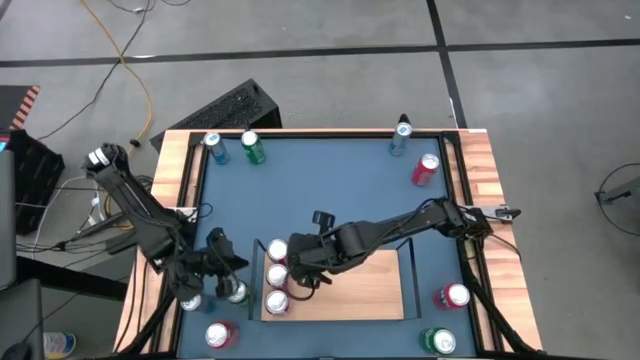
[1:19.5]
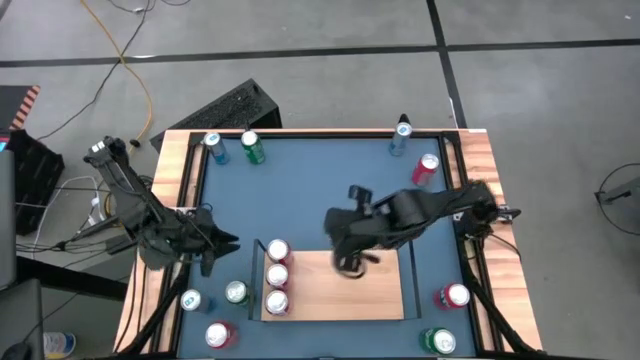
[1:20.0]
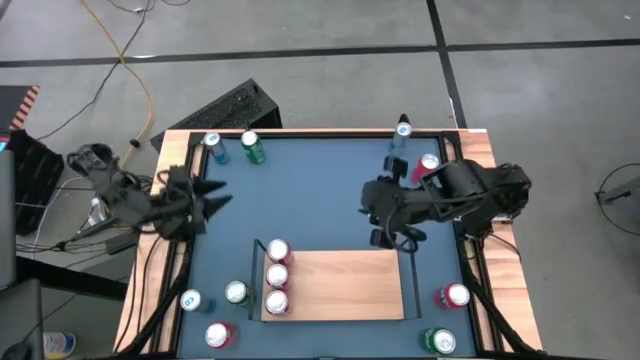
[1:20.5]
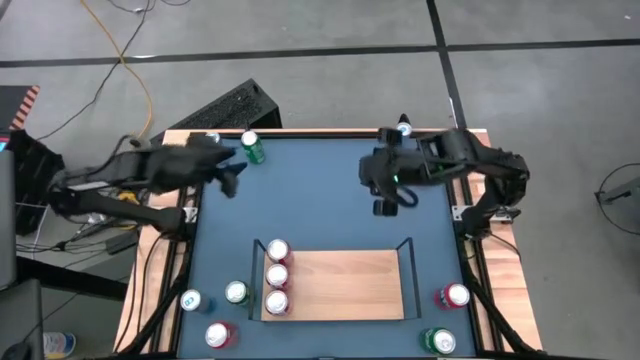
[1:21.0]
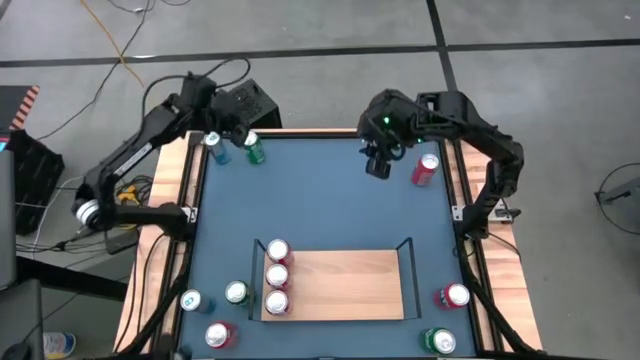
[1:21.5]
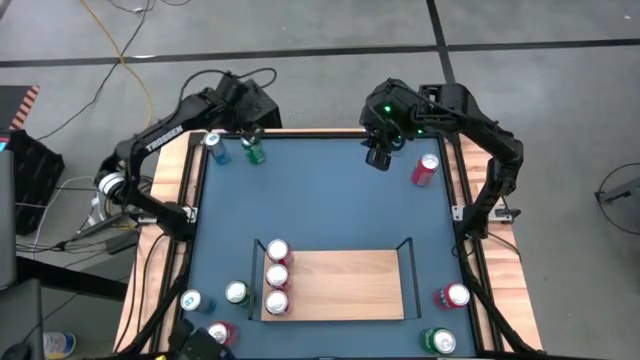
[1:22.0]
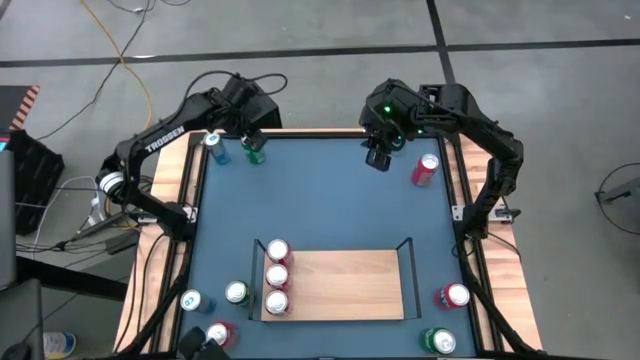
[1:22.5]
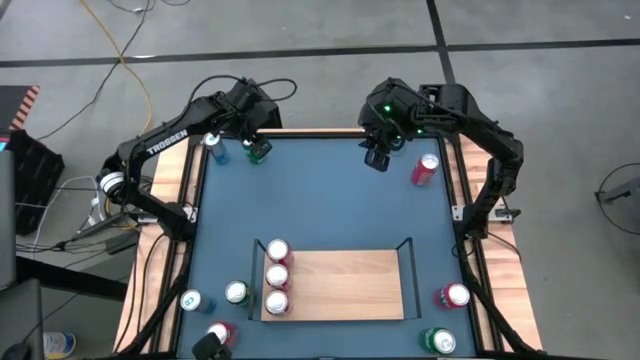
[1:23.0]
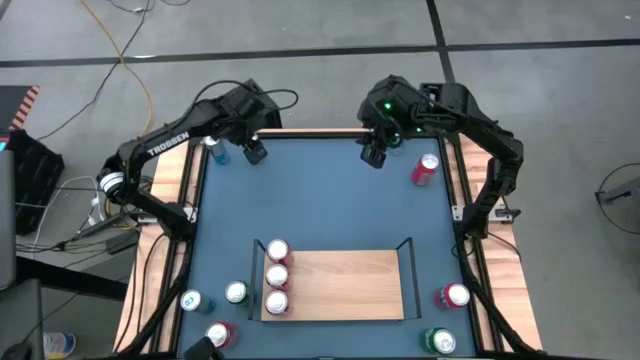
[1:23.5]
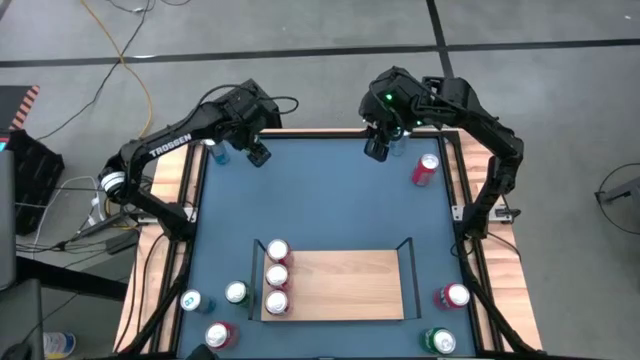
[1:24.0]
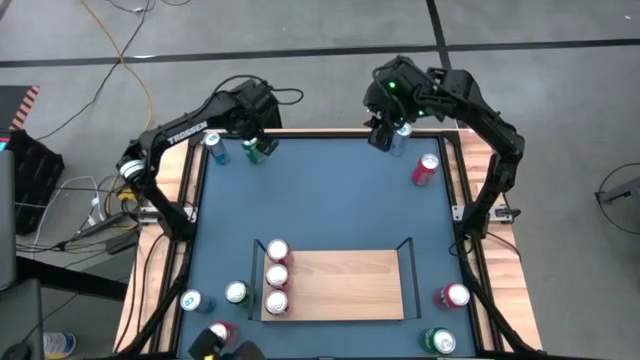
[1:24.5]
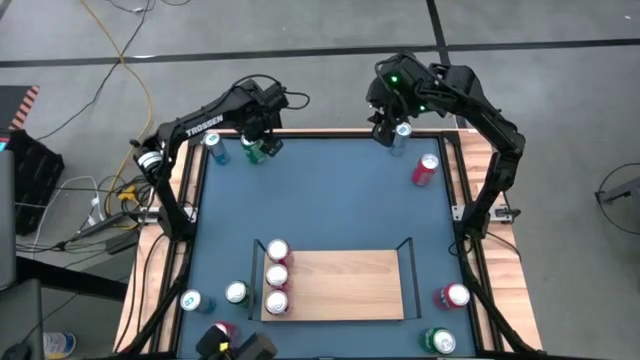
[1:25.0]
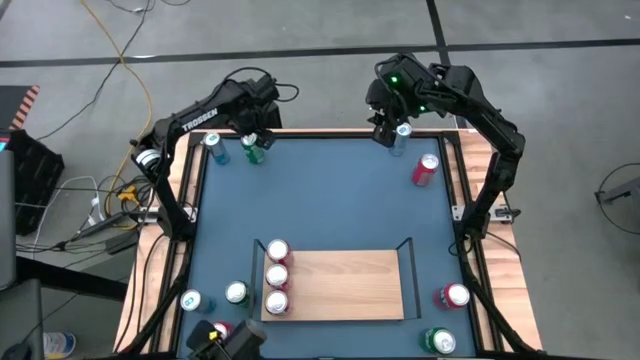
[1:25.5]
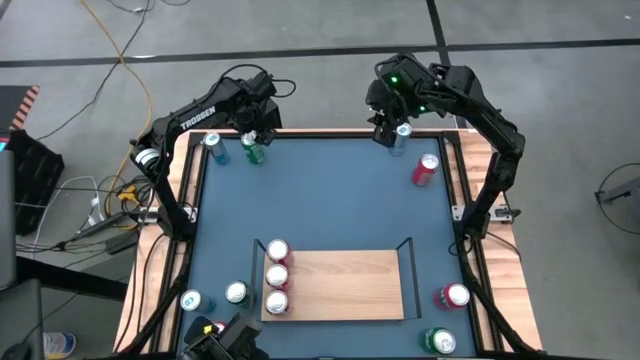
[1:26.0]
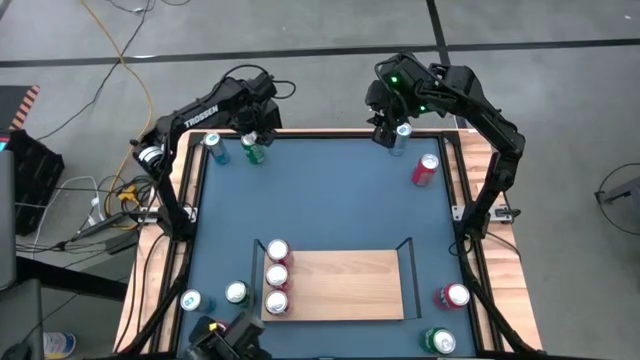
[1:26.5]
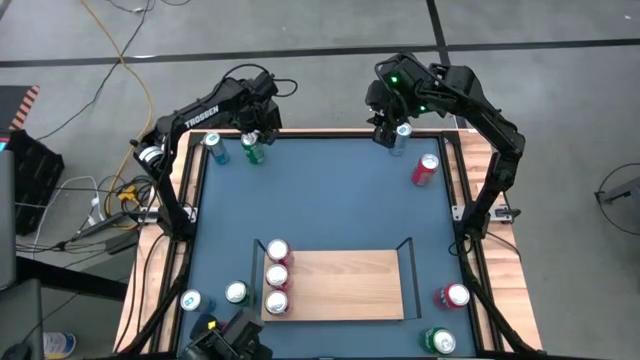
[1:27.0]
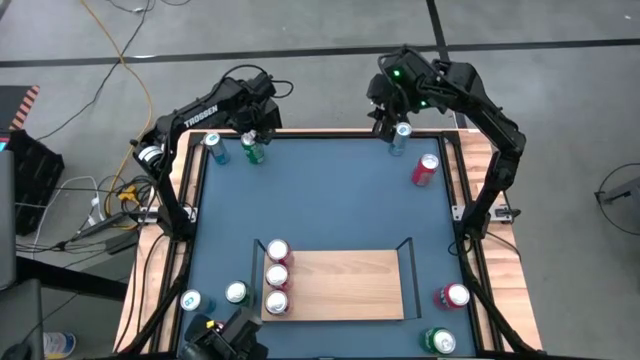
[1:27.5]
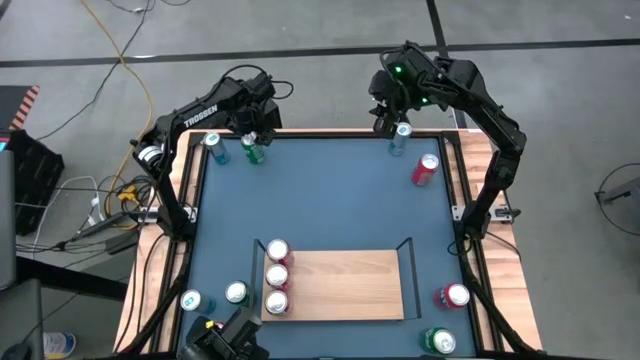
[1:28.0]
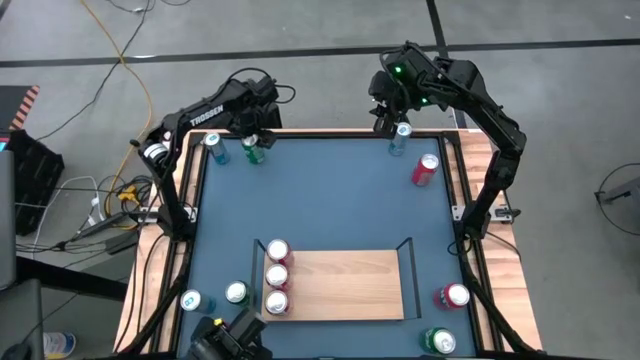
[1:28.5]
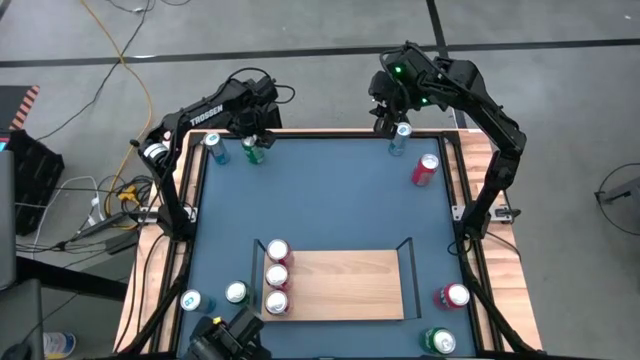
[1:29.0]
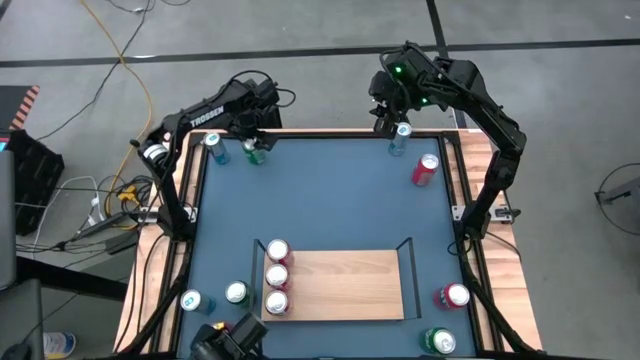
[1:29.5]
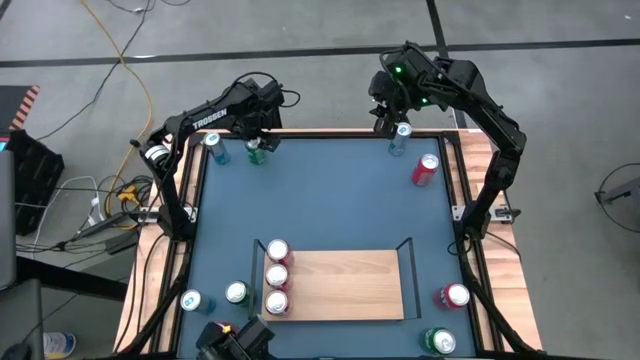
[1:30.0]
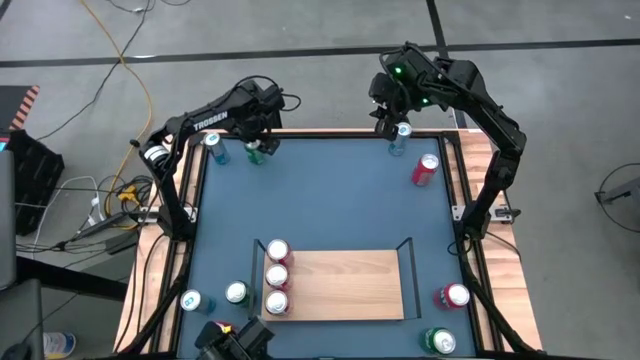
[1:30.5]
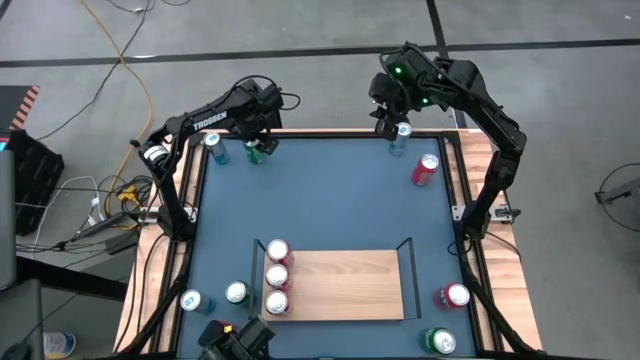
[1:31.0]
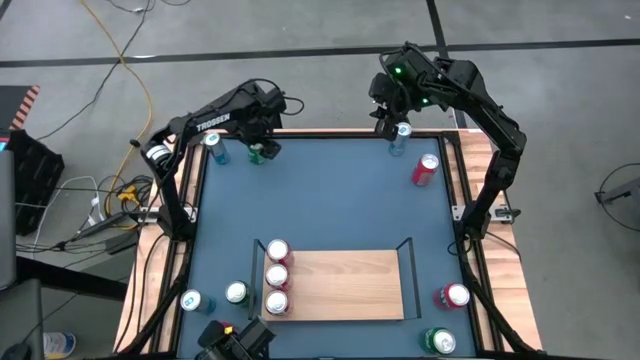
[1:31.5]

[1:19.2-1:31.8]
Task: Place canned beverage on shelf
Put the top left green soda can on the shelf aligned with the left red soda can

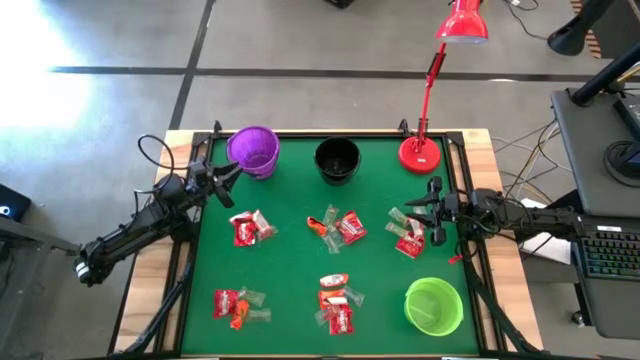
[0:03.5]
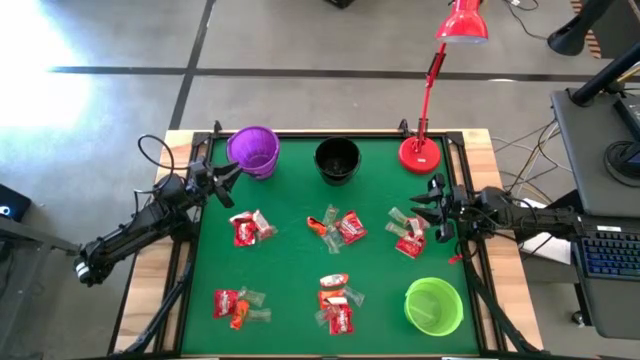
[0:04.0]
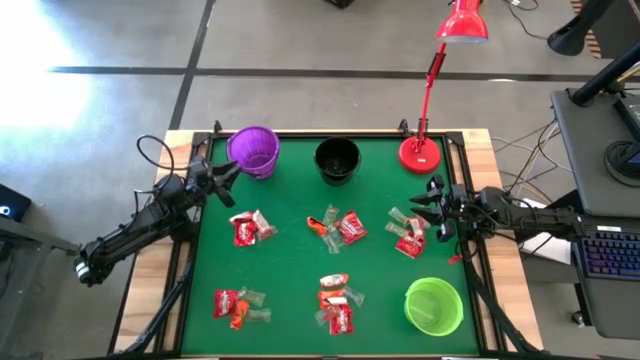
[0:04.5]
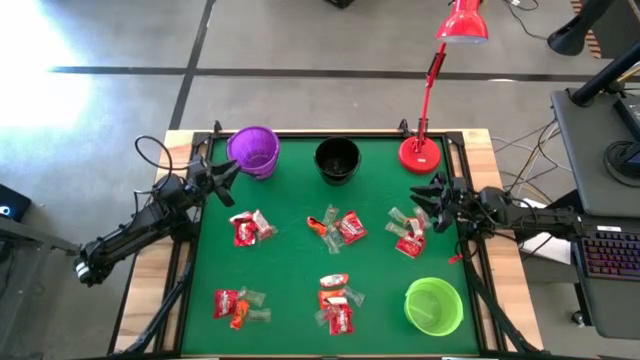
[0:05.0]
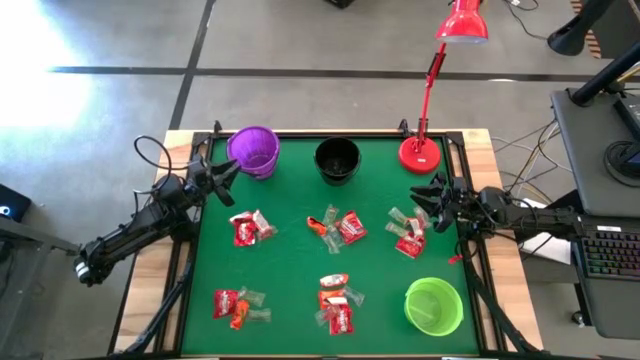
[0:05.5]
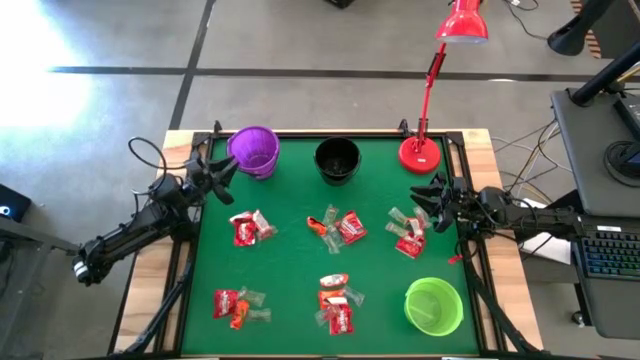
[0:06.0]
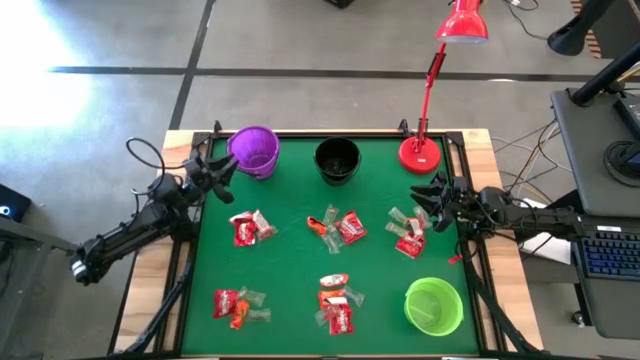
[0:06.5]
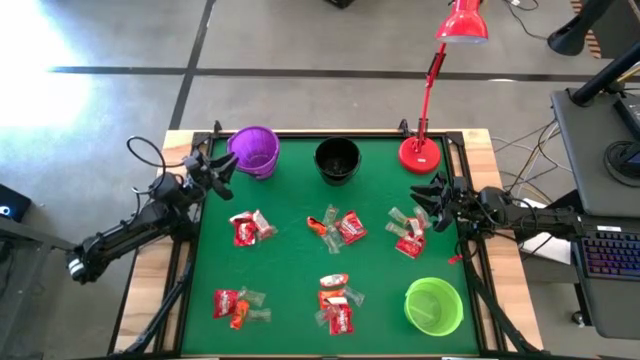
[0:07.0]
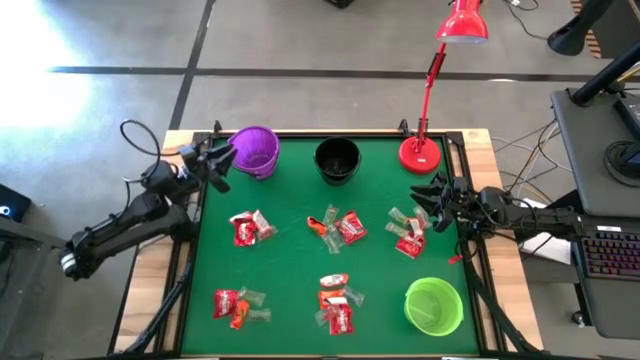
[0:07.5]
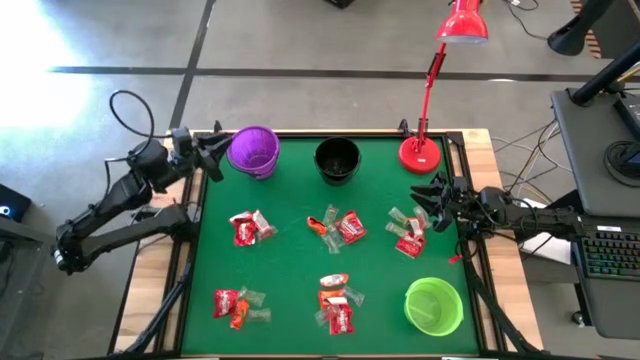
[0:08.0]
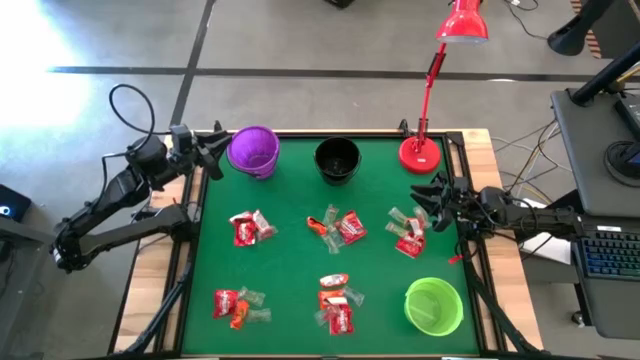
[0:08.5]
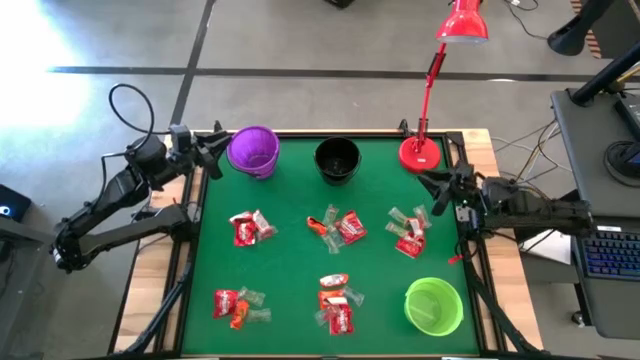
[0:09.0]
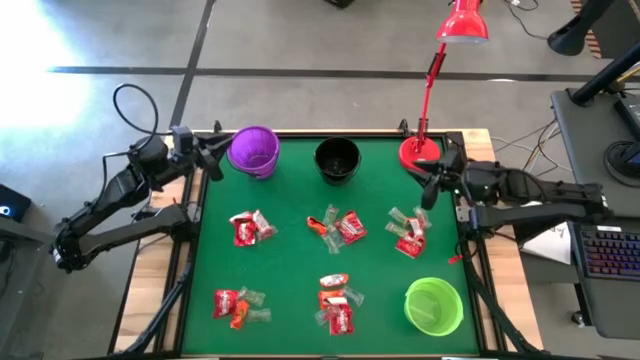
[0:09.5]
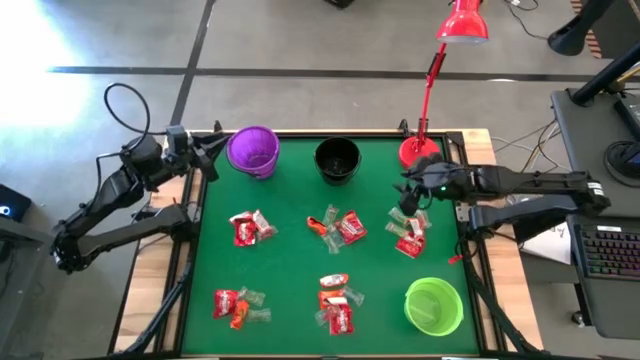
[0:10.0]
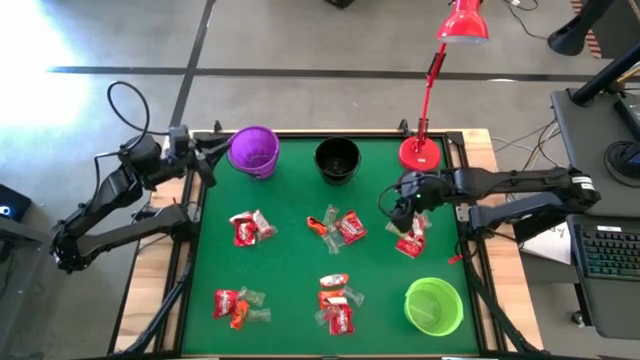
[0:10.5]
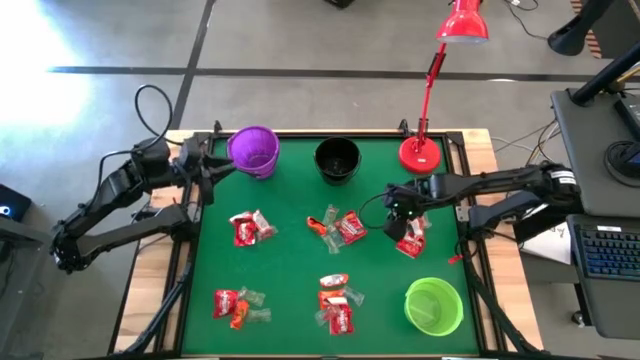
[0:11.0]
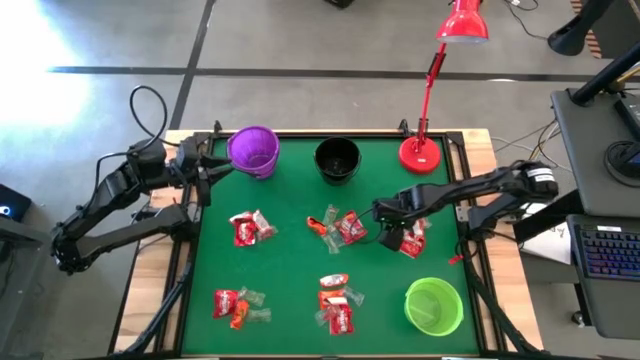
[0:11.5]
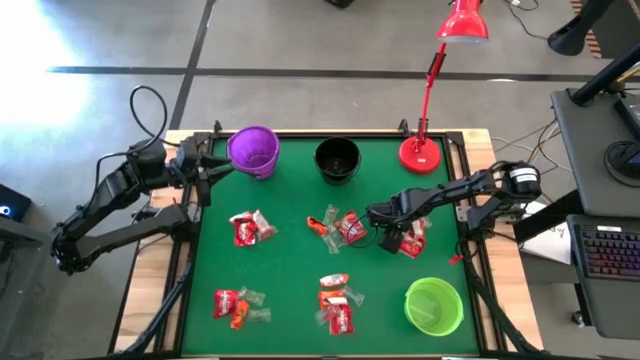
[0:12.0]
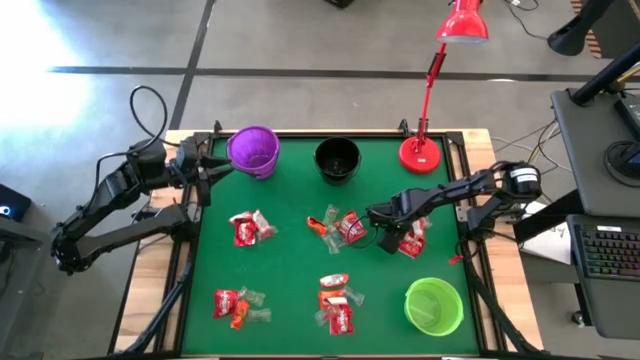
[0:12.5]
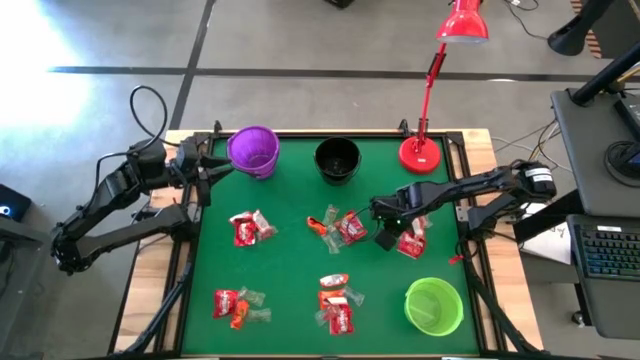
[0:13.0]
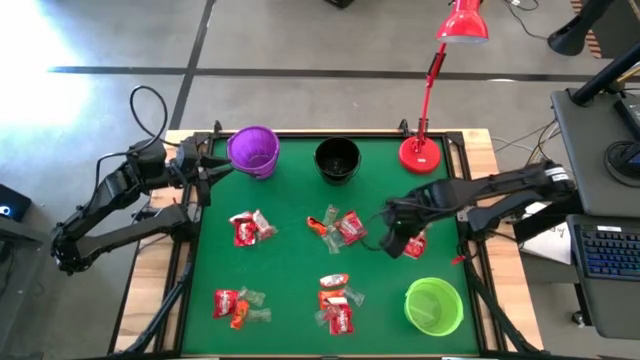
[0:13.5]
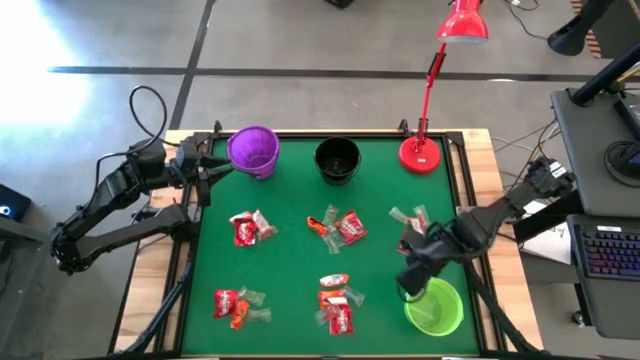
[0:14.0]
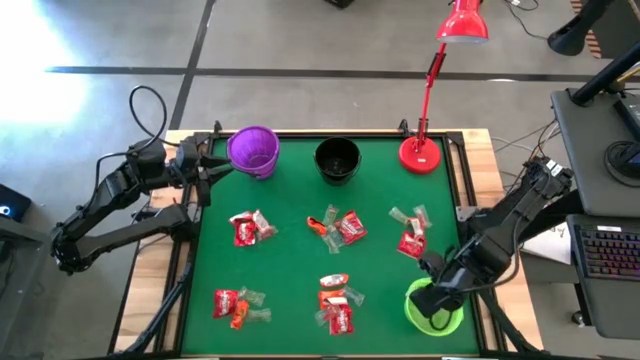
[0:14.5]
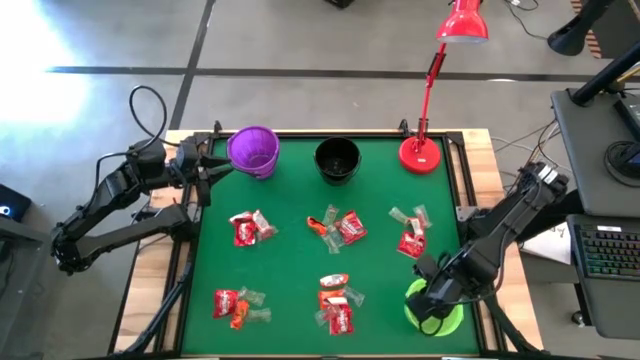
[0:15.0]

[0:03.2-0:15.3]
Task: Sort candy
Put the green gummy into the green bucket
